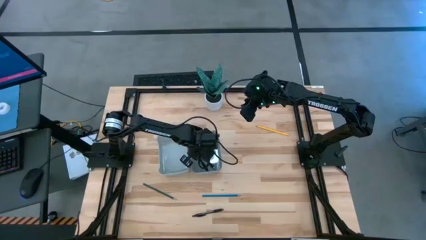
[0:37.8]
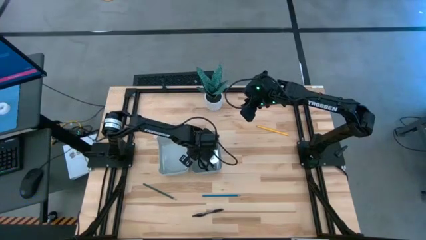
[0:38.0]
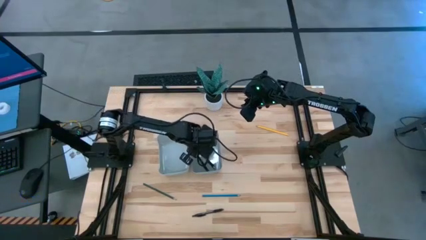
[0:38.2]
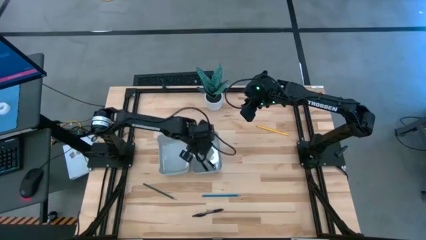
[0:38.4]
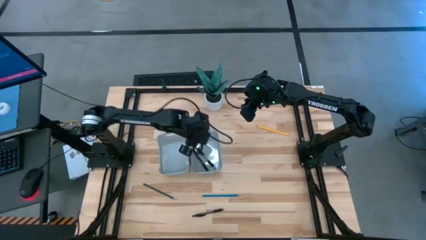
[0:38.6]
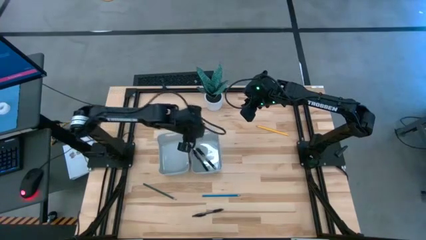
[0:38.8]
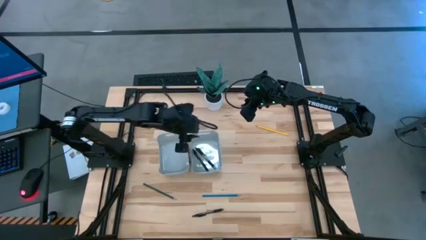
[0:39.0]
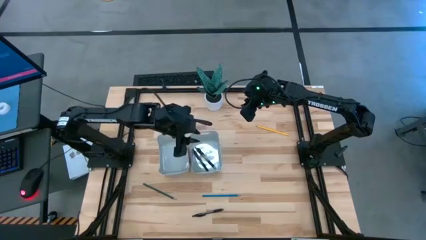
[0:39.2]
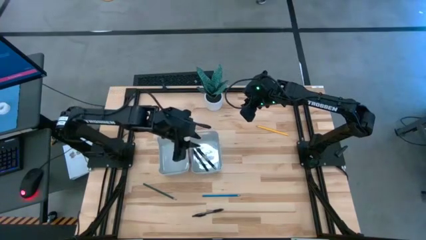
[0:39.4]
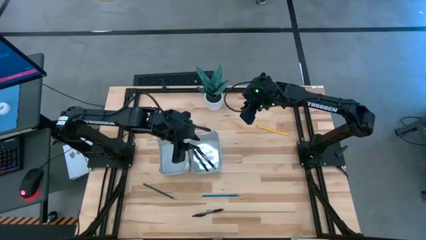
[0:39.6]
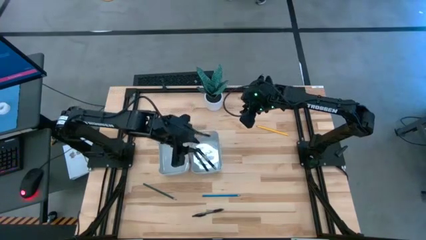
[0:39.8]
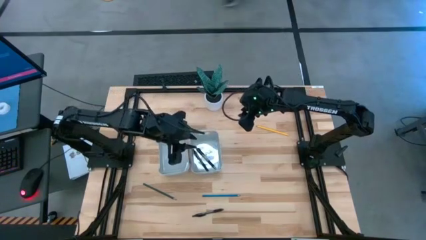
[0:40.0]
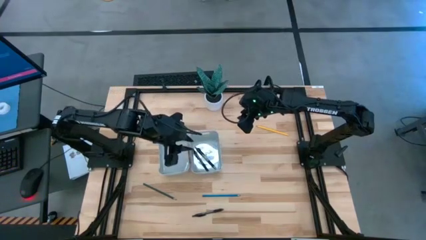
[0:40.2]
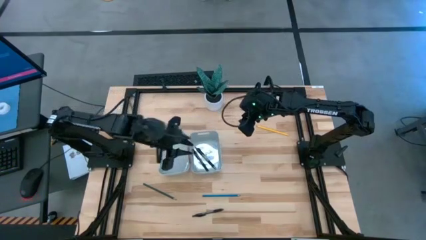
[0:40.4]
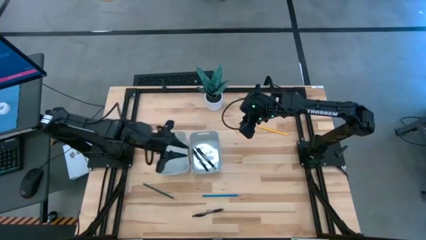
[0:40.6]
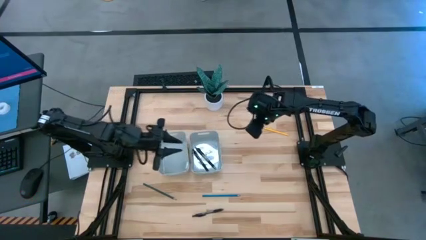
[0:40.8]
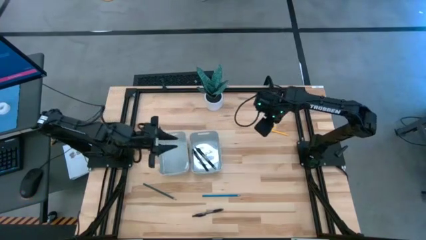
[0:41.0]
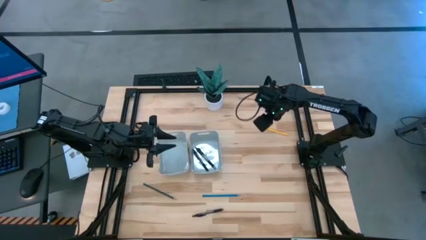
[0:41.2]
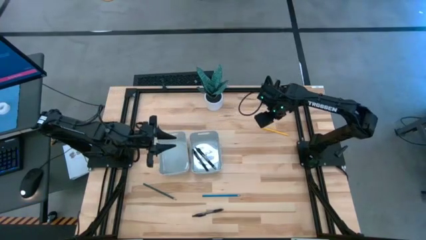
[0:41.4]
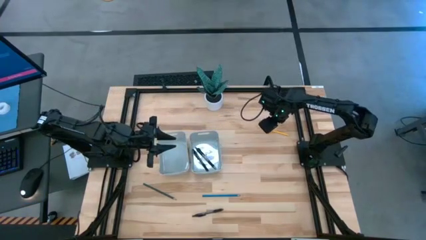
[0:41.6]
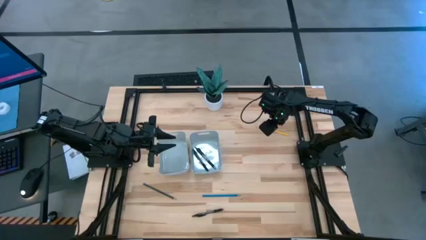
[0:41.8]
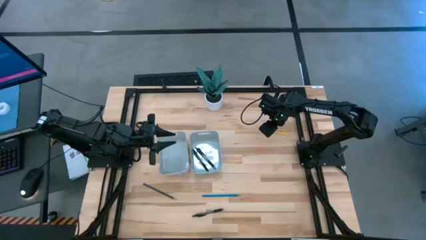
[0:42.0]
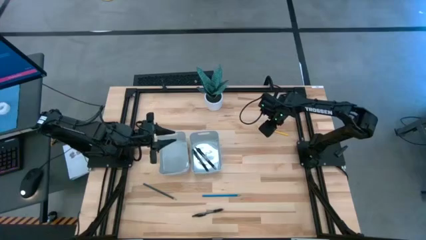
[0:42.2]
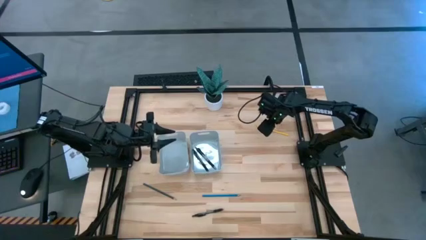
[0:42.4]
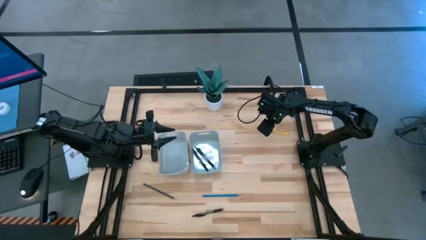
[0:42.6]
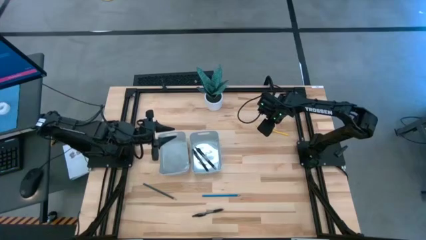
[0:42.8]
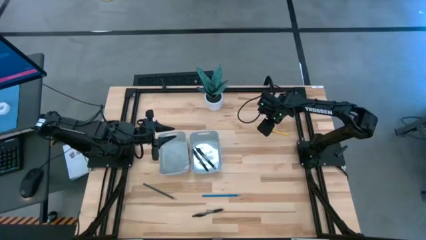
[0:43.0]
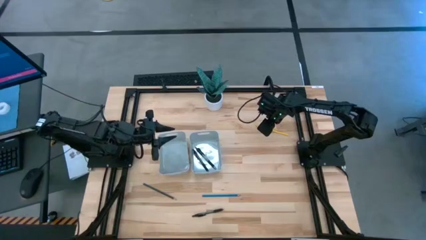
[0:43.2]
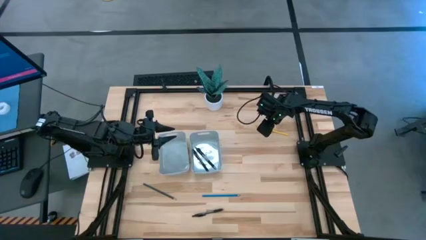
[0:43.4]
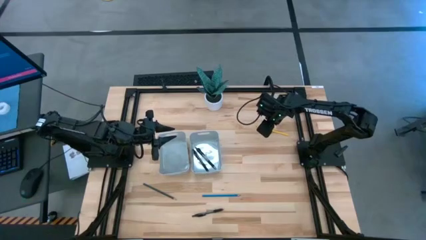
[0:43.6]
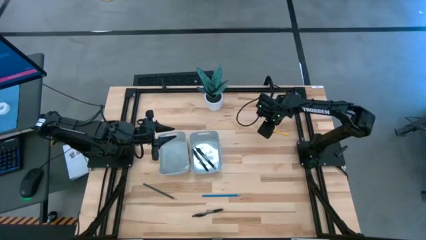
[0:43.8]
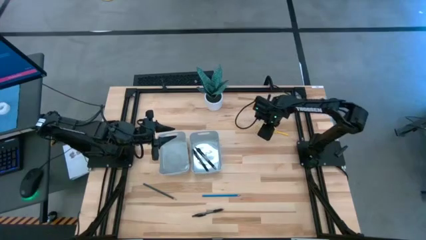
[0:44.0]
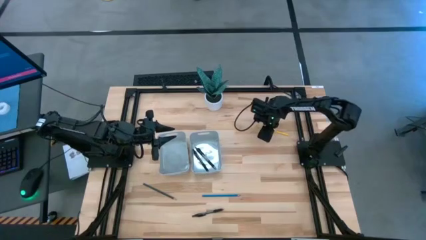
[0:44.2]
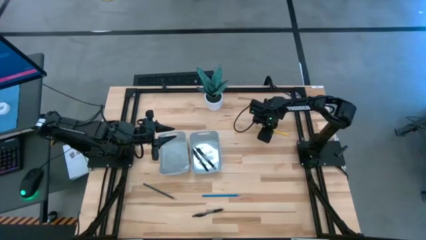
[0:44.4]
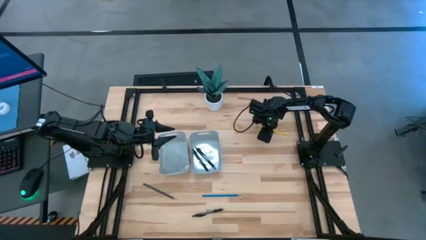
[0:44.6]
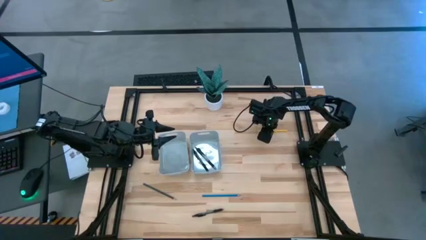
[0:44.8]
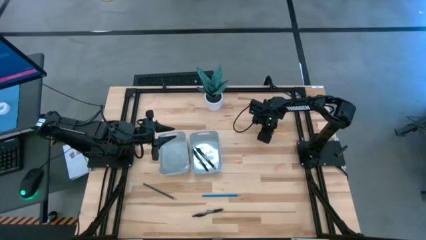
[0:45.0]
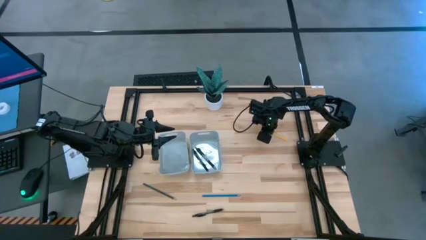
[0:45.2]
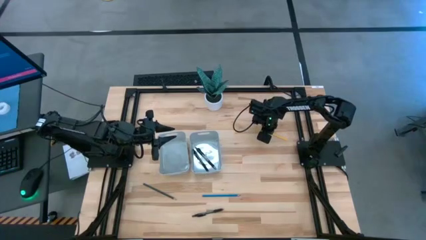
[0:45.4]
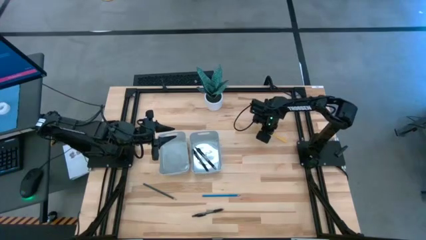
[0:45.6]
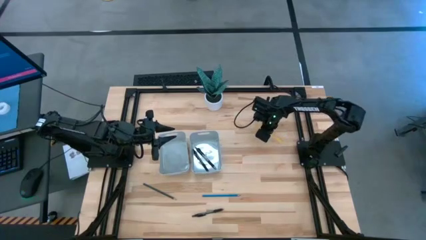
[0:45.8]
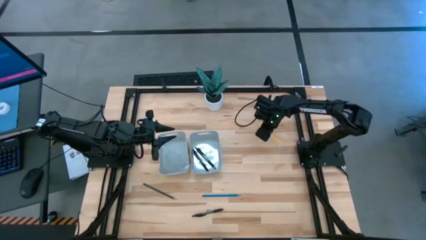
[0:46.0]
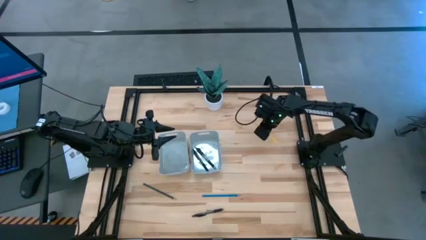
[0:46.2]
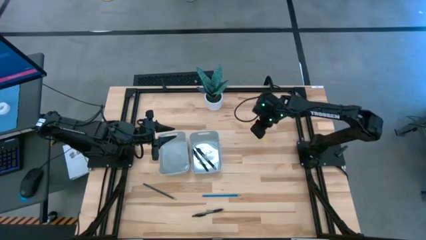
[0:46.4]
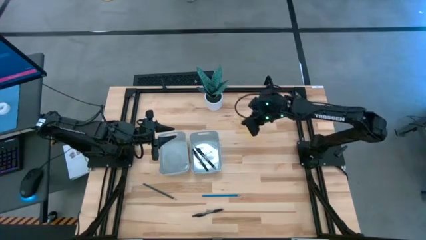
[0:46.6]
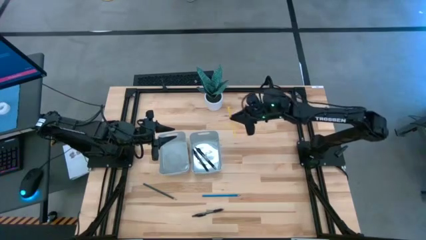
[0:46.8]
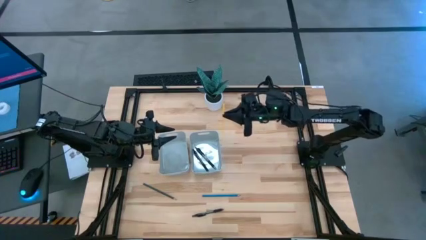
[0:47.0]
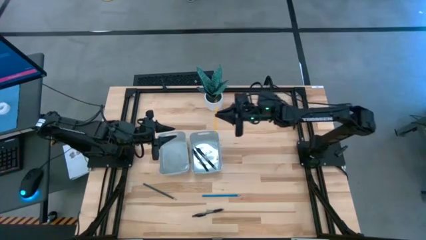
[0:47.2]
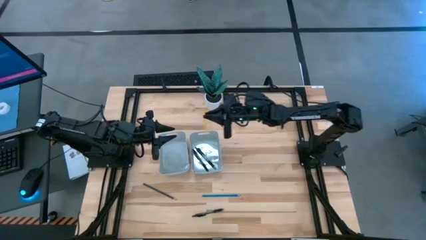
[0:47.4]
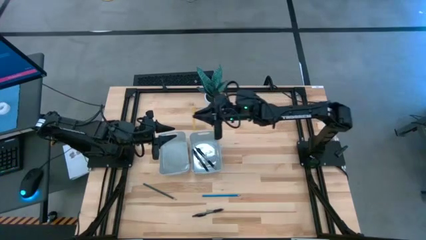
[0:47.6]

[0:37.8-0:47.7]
Task: Sort pens & pencils
Put the yellow pencil into the left gray bin

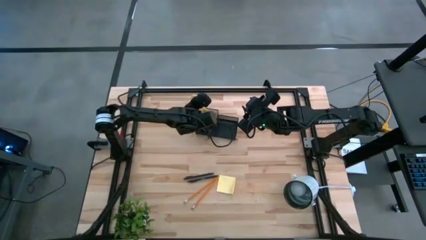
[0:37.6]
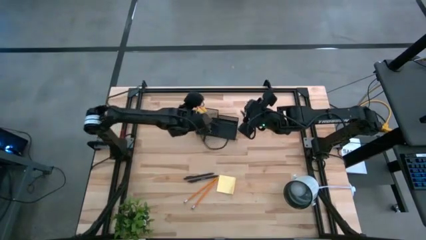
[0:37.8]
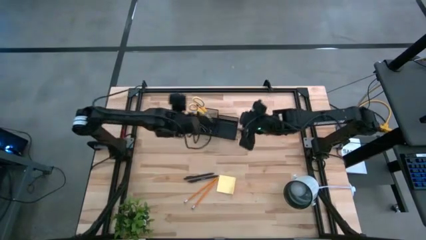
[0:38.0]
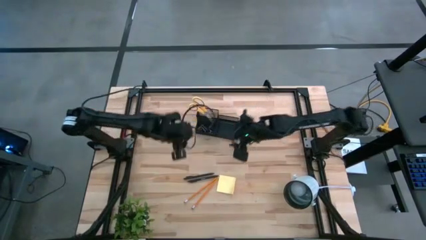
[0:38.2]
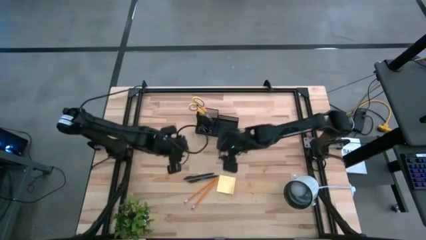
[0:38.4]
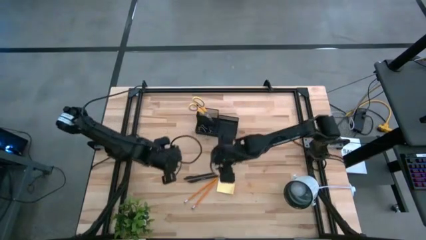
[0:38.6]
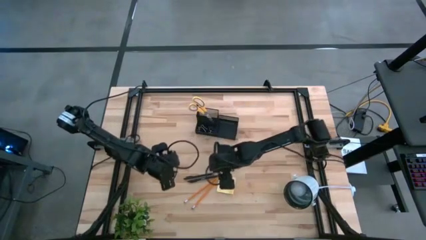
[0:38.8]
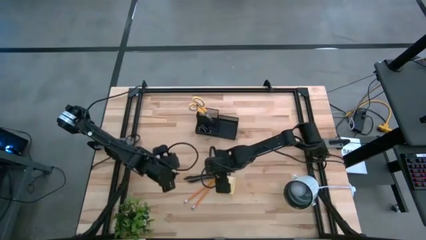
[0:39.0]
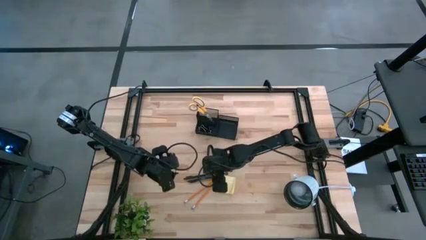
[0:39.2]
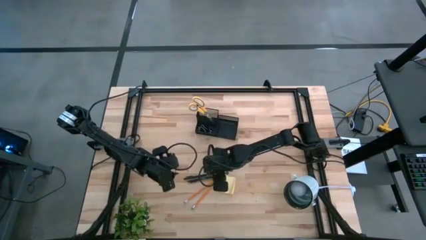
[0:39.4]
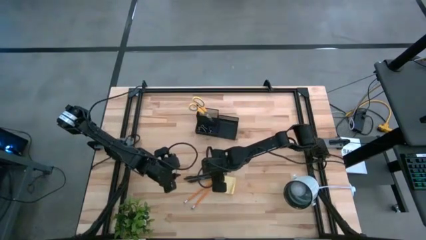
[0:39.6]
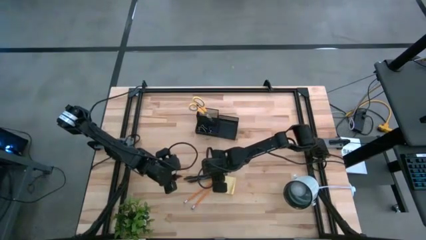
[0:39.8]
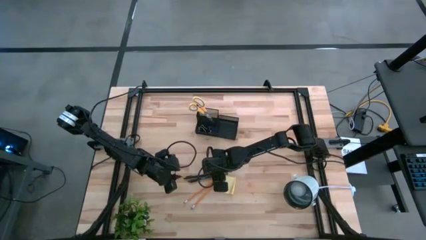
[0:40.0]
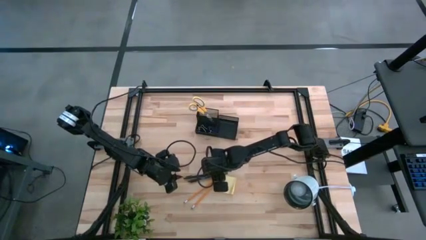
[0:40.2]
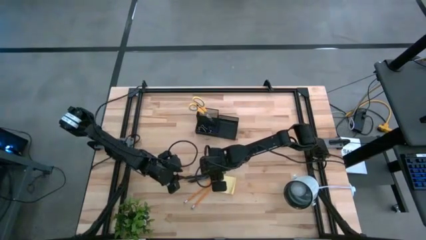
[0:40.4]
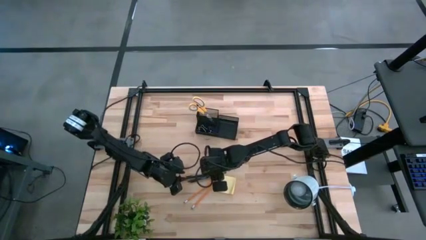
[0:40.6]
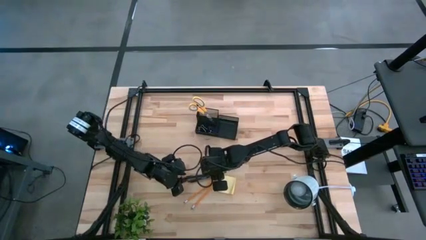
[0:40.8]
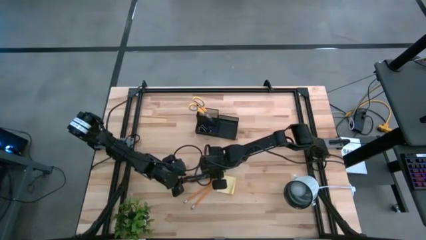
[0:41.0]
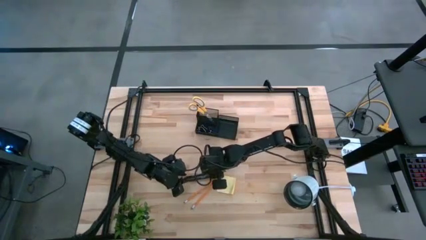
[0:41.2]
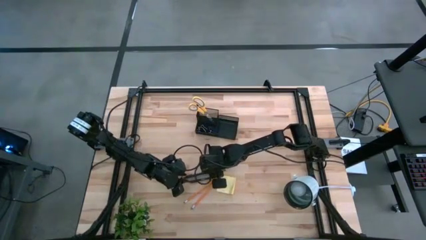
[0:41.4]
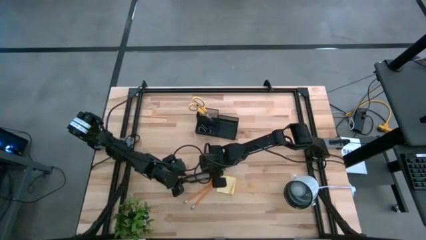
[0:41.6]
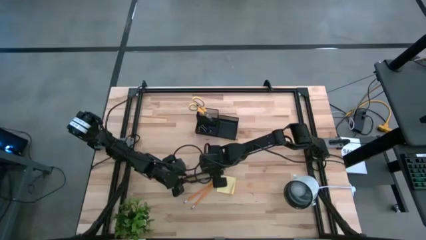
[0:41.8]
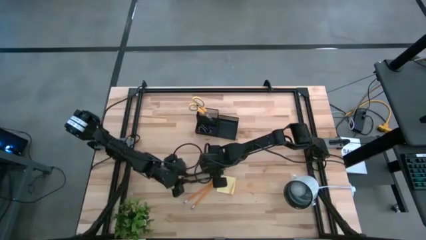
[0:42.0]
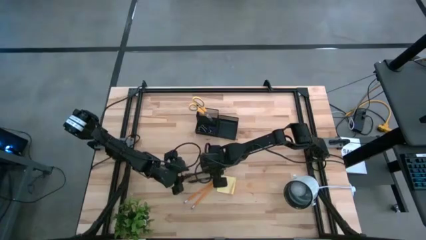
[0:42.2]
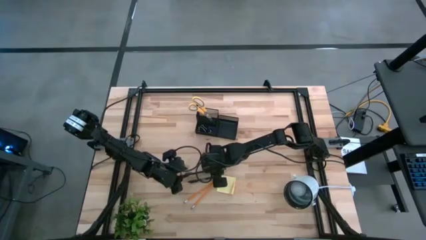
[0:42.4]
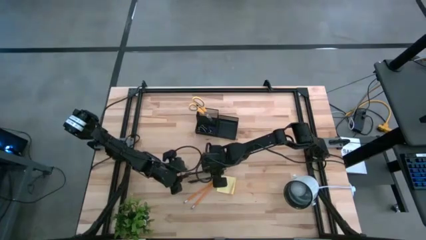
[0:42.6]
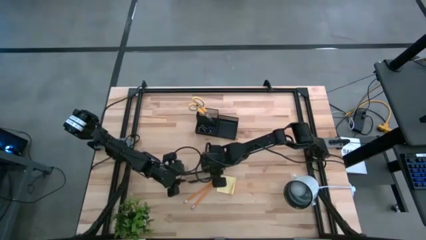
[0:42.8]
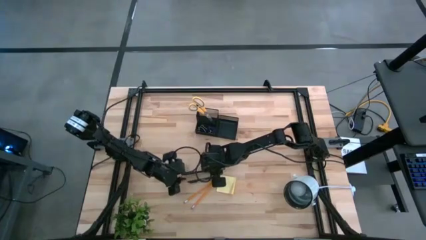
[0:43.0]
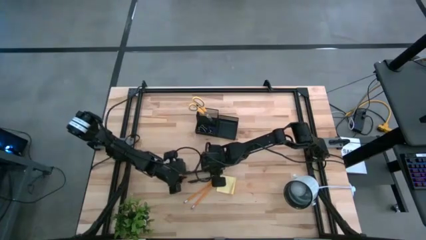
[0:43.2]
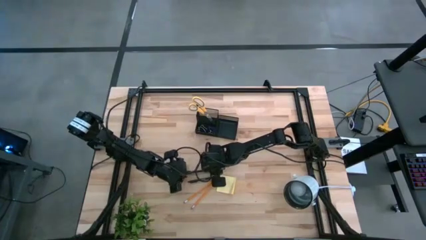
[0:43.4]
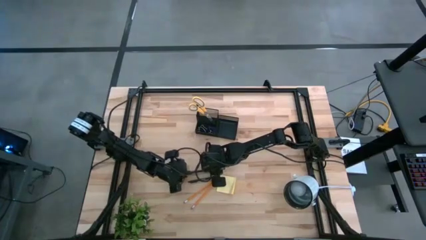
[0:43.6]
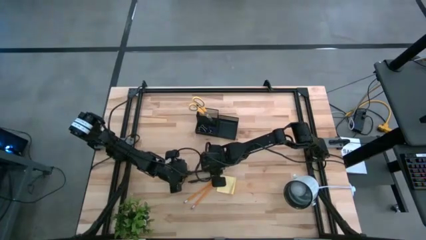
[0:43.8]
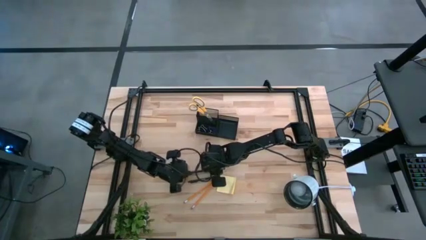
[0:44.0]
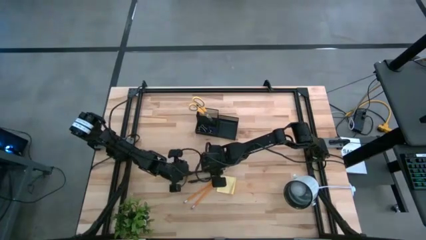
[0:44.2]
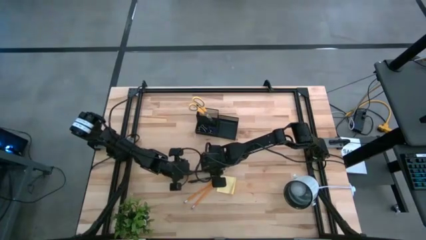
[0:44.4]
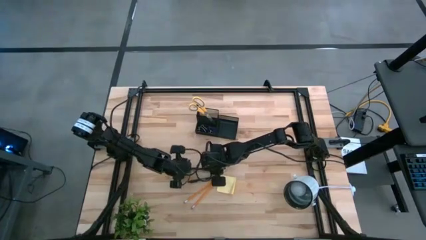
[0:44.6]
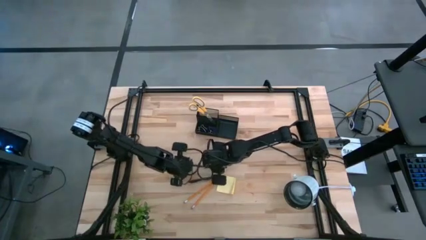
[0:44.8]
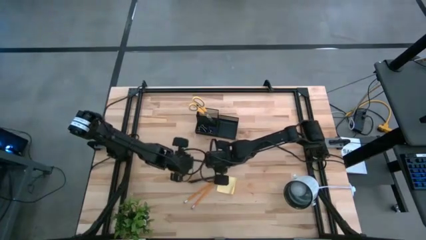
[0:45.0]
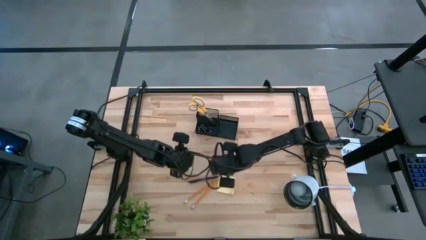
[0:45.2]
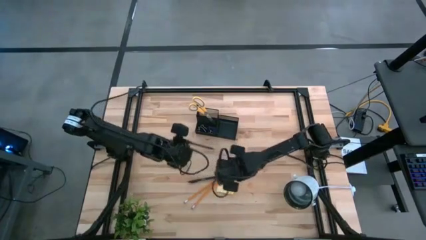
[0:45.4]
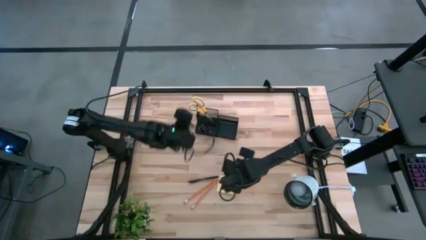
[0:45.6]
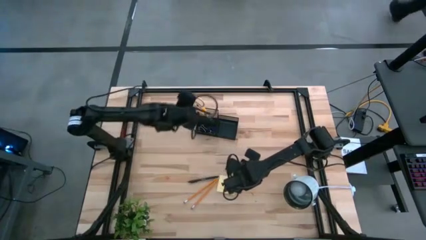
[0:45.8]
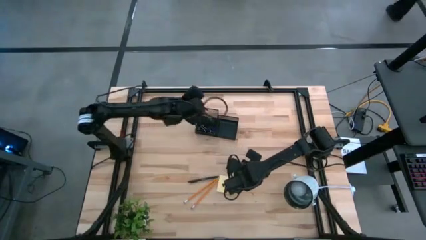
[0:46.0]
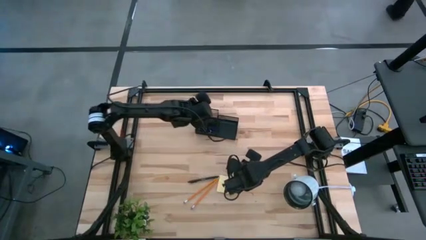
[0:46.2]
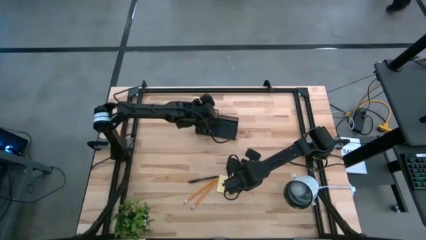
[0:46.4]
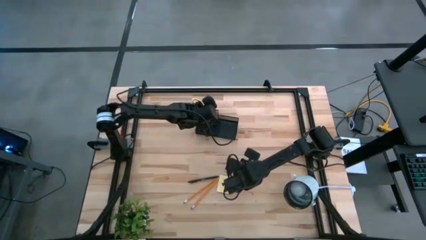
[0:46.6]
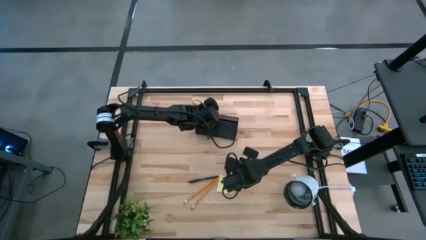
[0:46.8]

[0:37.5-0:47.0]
Task: Pick and place office supplies into organizer
Put the top black pen into the black organizer bin
